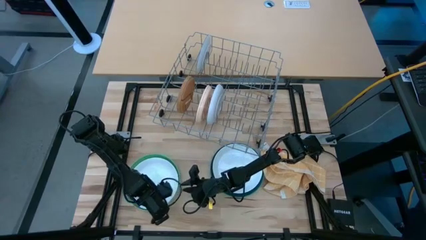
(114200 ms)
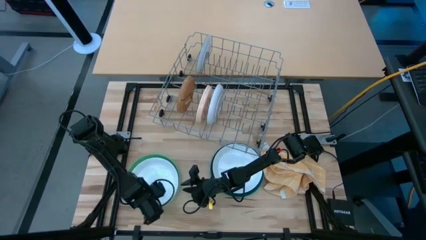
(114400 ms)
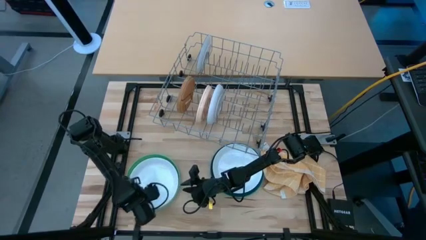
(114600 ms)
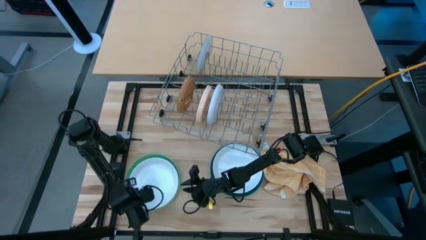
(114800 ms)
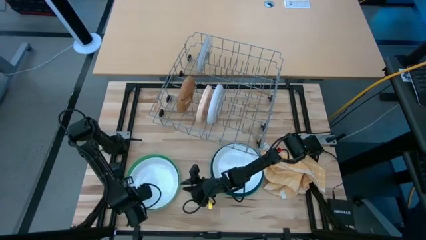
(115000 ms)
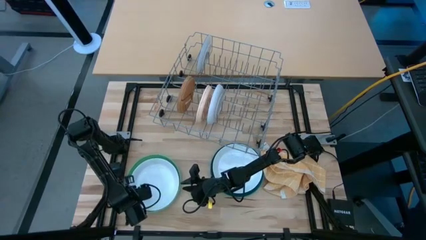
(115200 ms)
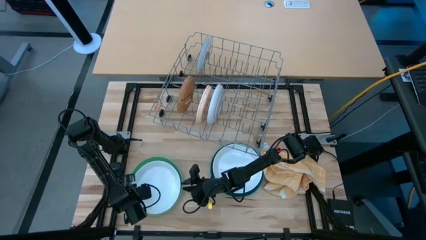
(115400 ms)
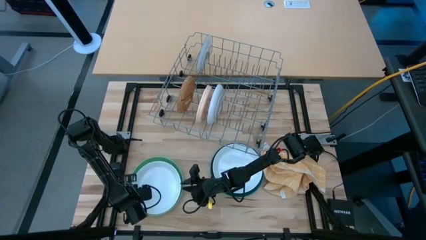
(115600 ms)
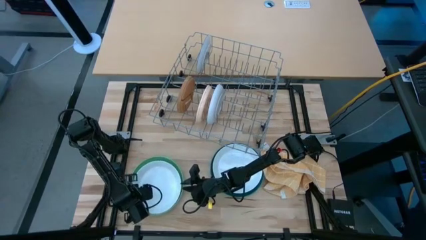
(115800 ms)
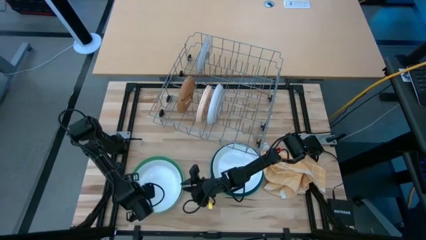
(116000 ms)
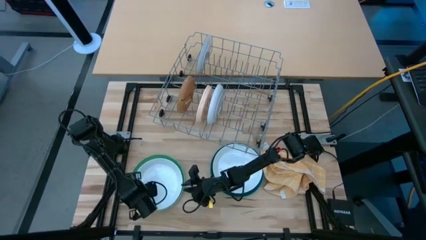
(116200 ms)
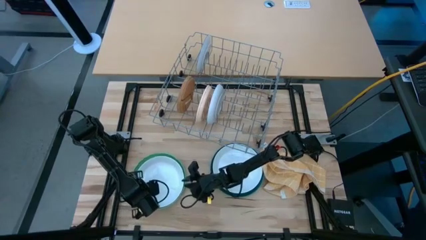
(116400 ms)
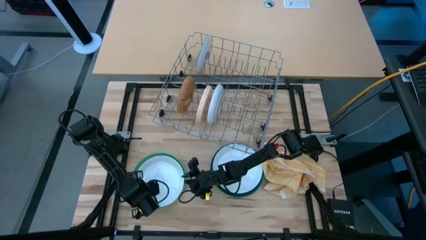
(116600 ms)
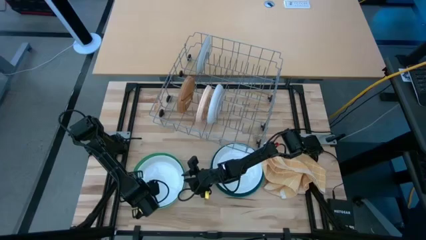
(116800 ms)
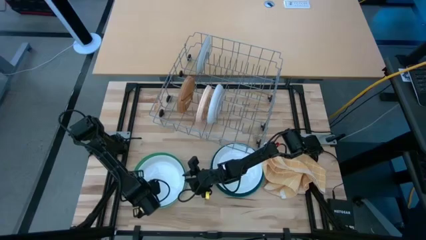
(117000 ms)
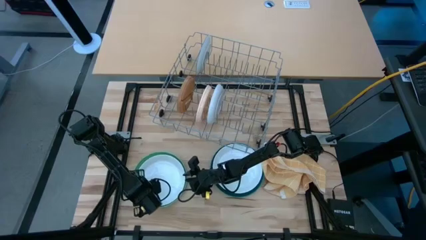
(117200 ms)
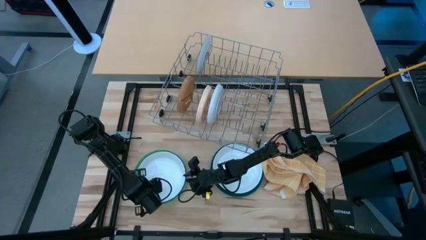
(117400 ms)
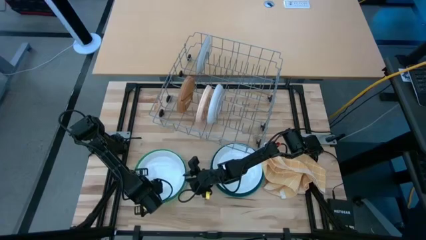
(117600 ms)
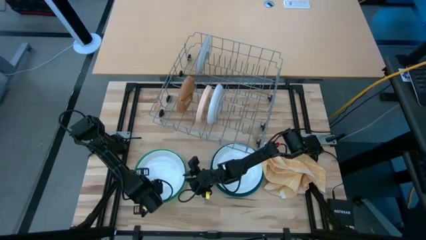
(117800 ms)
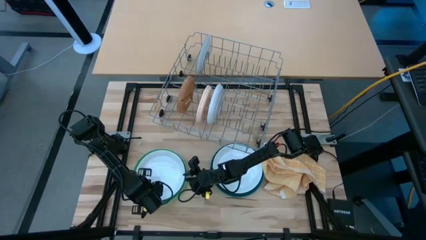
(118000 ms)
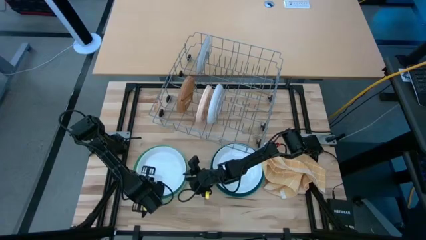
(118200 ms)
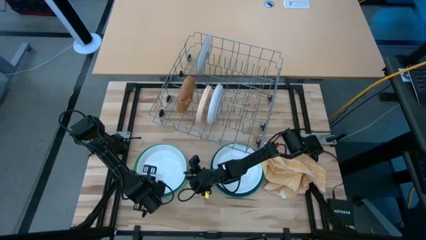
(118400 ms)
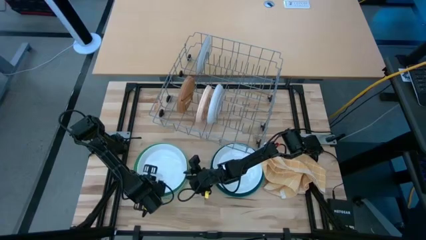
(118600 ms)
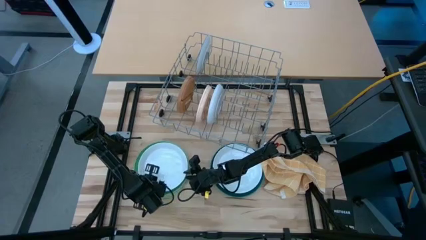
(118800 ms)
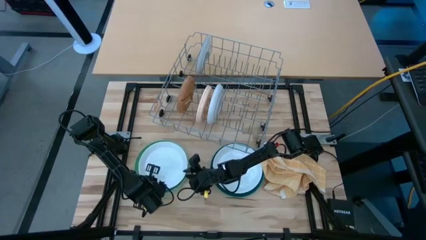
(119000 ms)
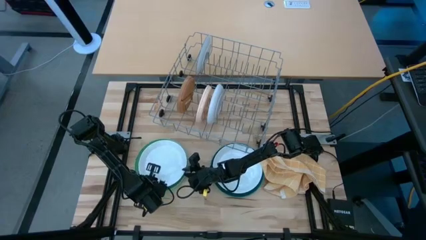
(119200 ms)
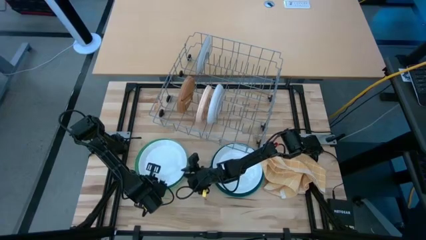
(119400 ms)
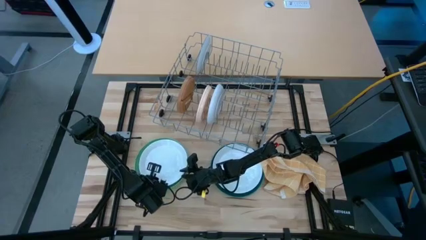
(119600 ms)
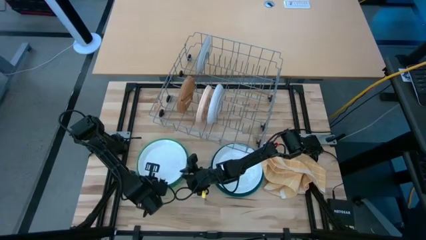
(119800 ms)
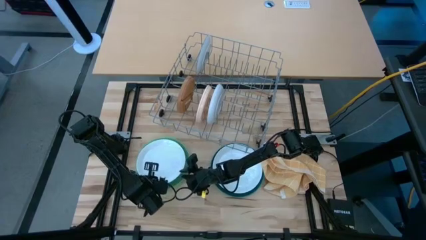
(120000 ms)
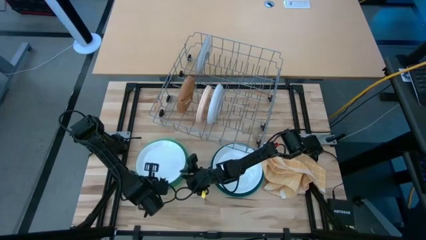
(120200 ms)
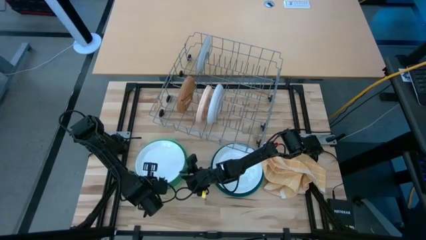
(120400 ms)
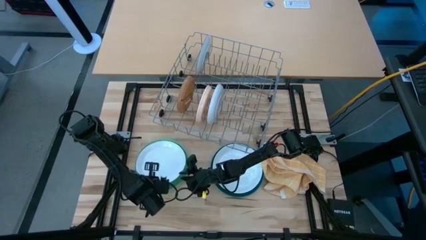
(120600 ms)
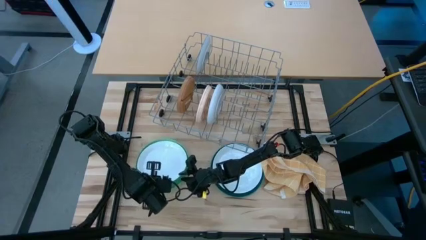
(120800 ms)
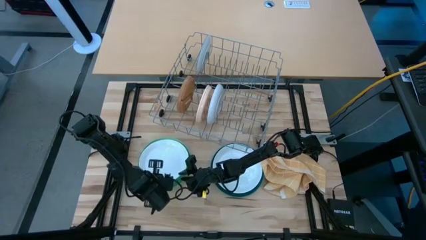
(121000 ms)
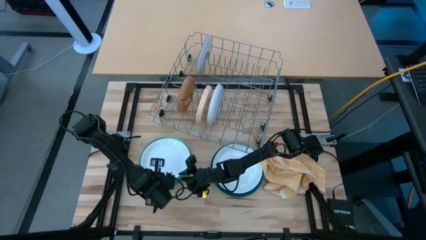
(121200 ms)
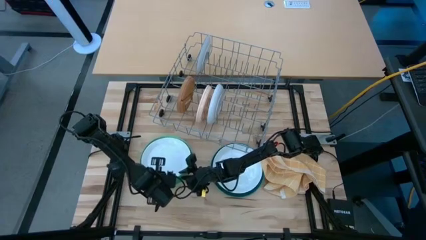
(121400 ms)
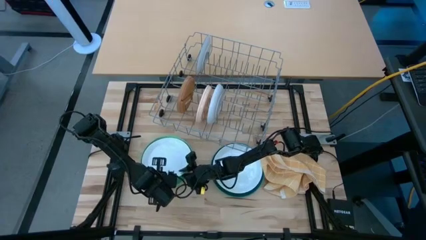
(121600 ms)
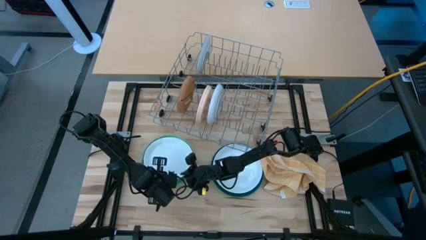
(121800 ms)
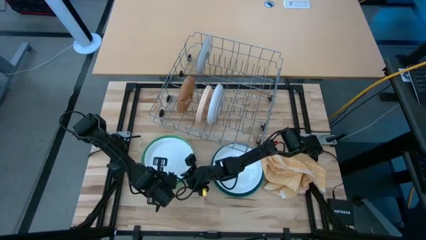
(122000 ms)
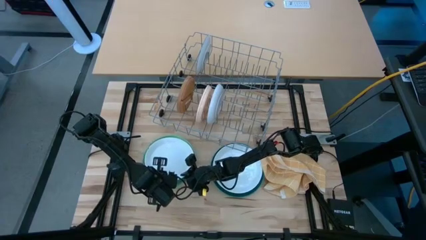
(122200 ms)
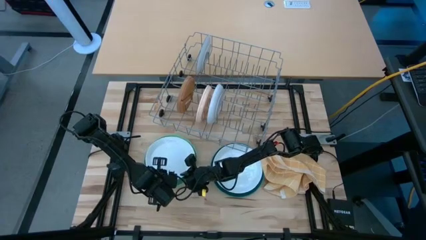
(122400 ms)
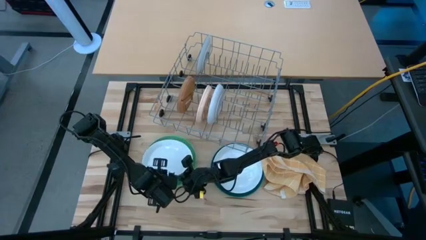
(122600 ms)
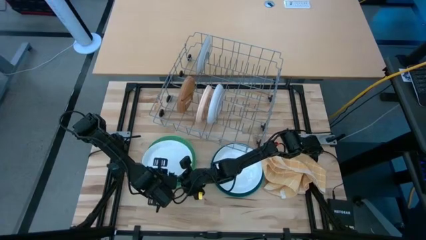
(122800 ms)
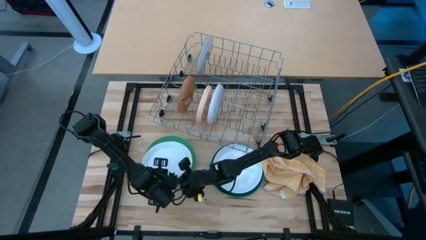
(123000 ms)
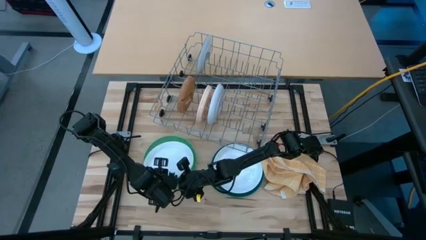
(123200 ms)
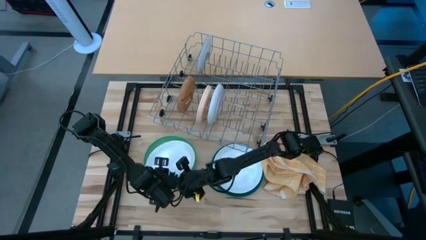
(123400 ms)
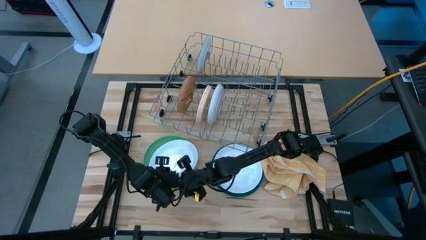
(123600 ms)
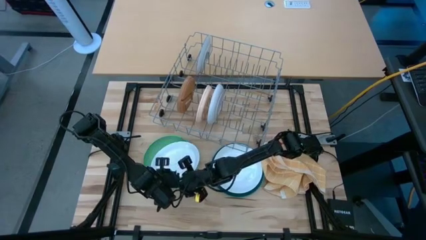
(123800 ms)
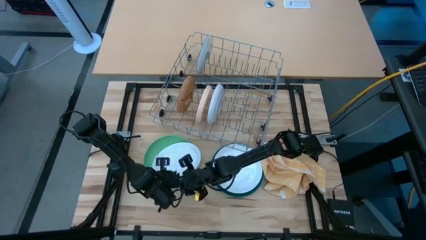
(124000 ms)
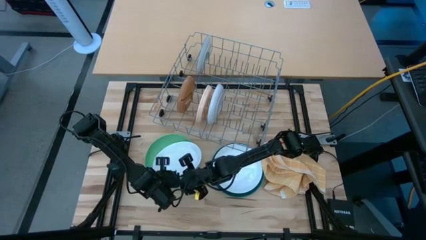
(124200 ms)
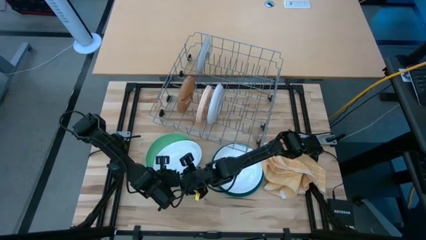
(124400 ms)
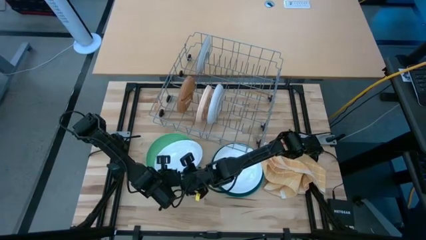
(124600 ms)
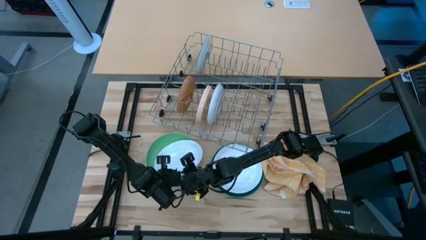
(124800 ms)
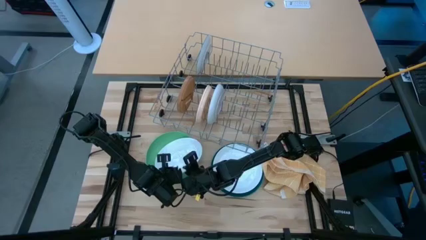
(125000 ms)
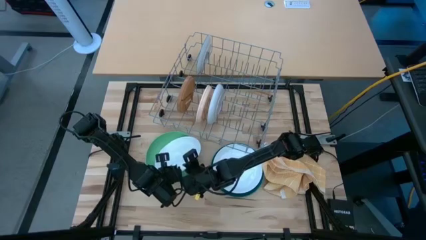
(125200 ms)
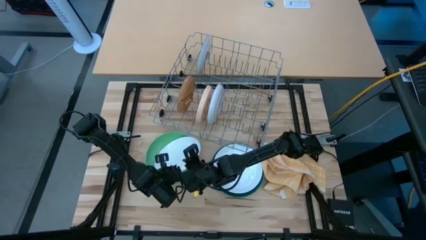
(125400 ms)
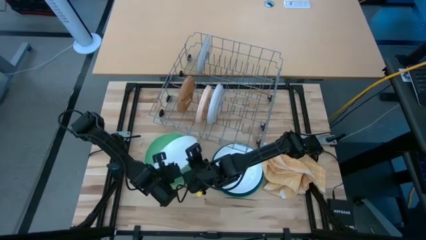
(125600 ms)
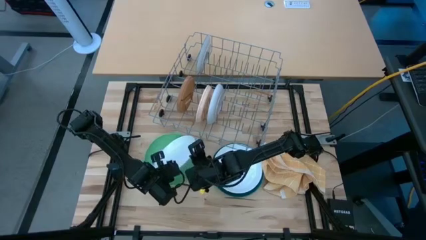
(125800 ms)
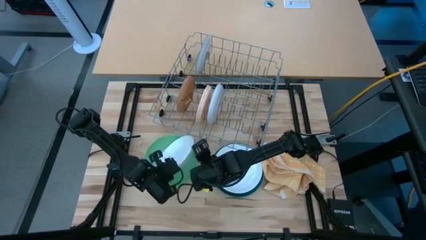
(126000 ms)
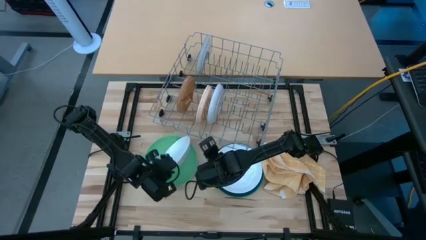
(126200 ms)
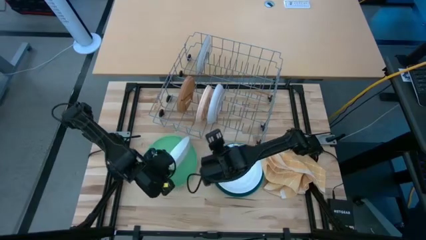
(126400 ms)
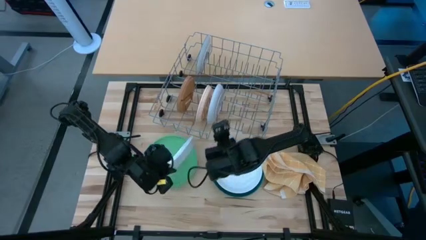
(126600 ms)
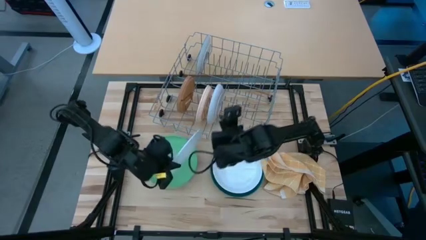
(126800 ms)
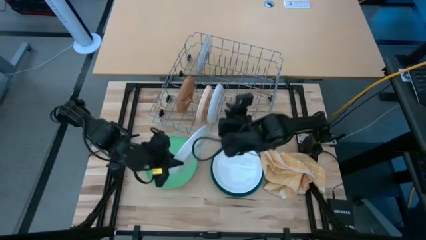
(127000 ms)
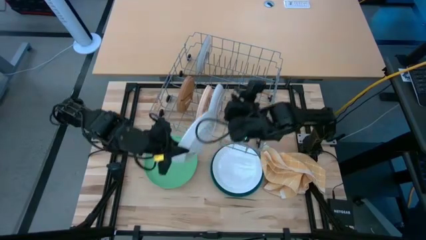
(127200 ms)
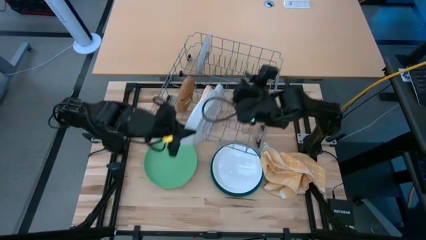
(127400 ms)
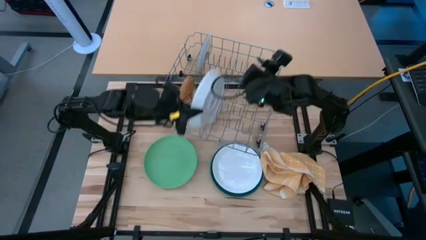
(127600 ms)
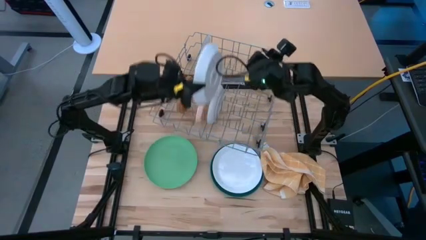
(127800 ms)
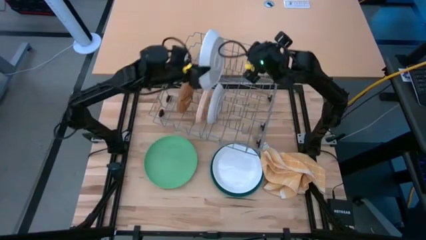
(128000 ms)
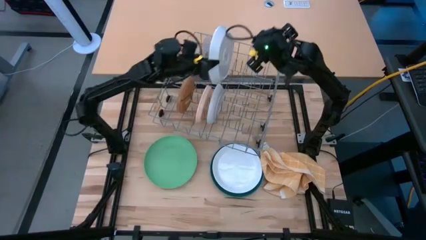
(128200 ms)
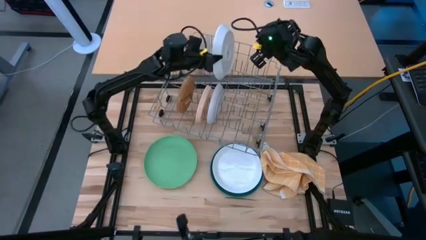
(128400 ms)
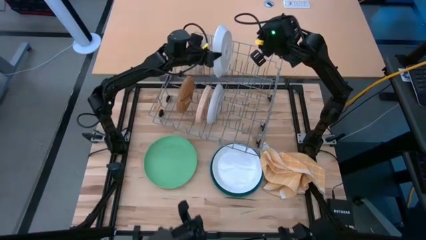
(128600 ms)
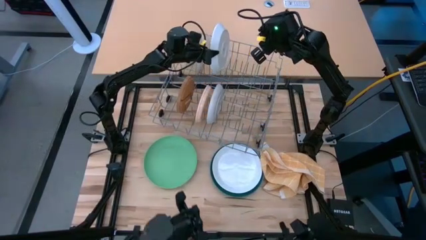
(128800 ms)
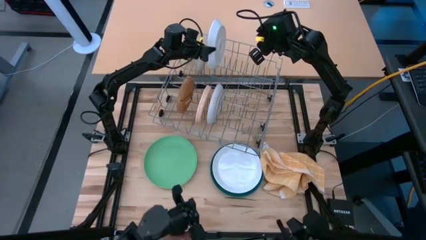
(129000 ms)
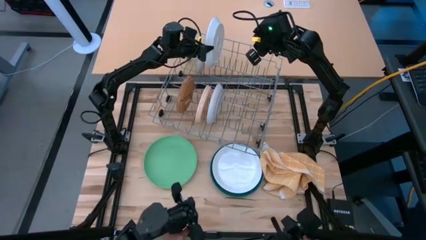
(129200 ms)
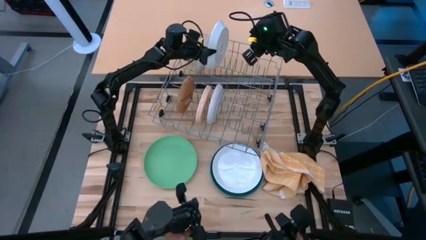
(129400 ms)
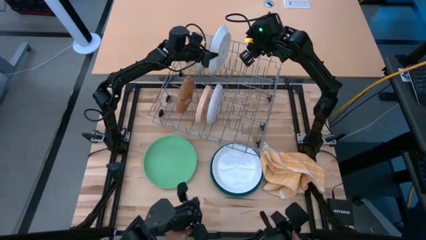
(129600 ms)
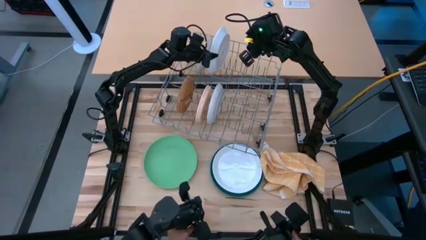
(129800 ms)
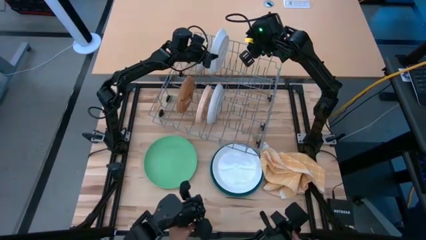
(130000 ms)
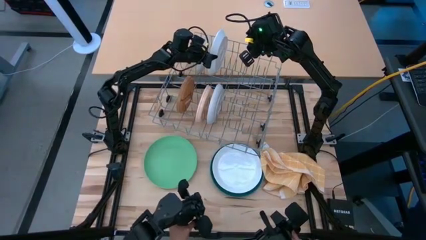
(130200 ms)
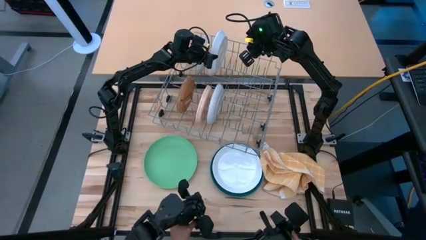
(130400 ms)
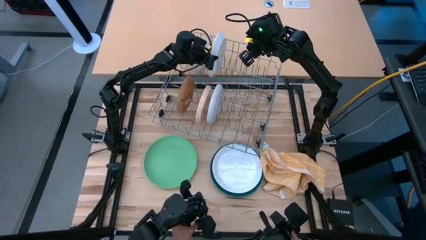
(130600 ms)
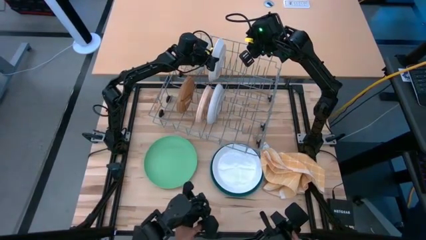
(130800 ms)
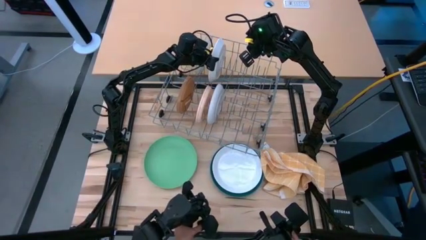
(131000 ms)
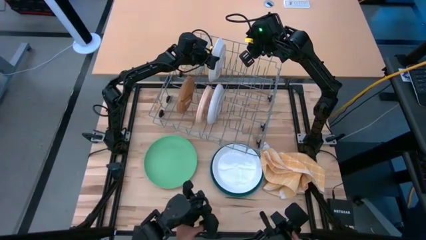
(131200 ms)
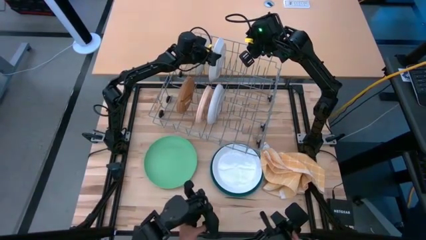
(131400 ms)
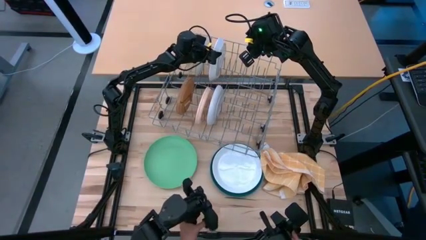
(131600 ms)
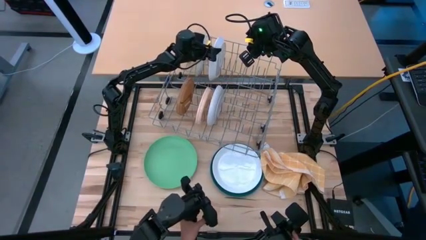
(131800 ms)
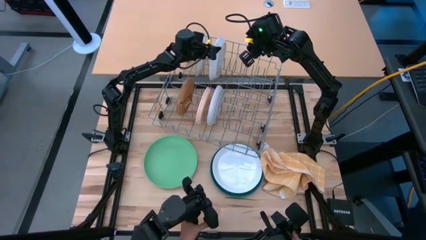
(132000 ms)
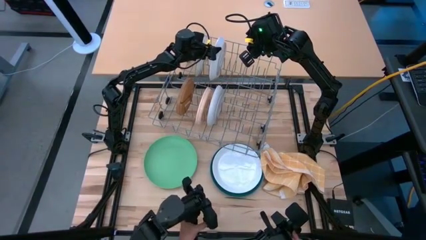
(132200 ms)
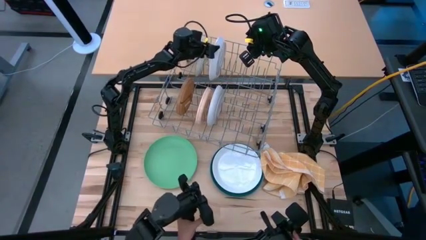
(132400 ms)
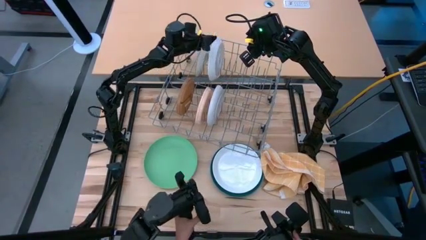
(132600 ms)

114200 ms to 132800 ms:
Task: Sort dishes
Put the left white plate in the dish rack
